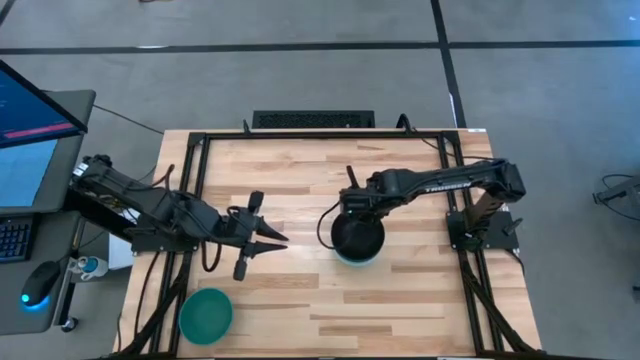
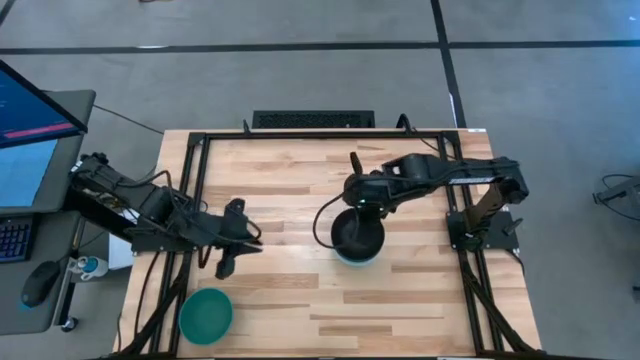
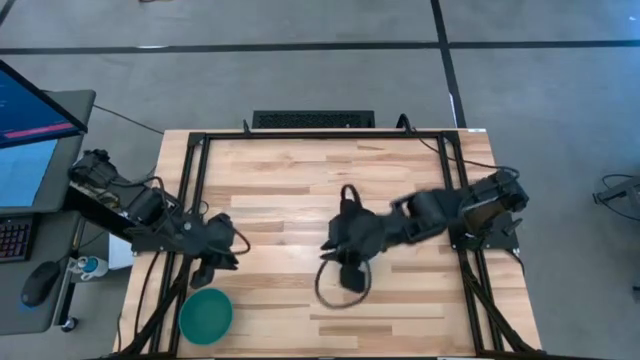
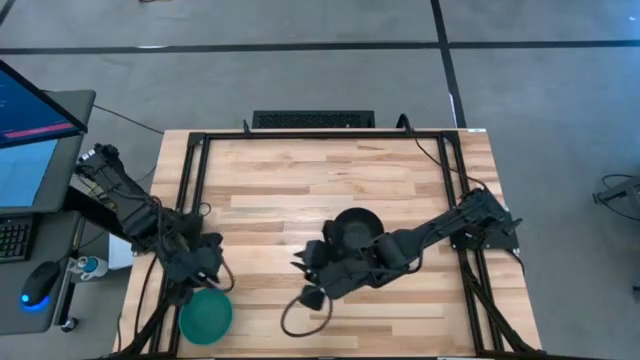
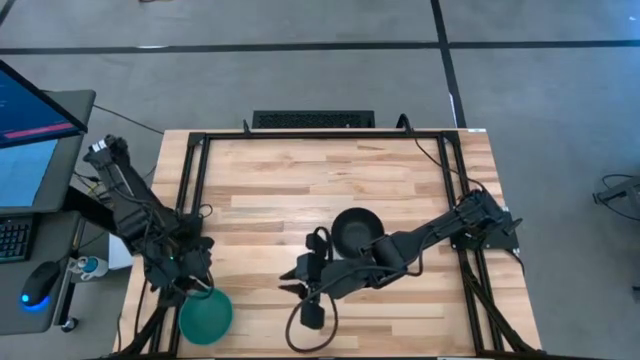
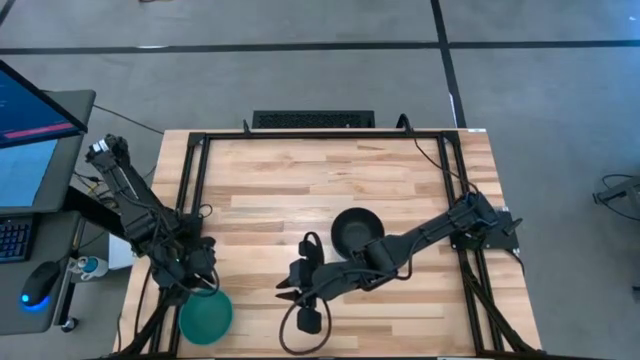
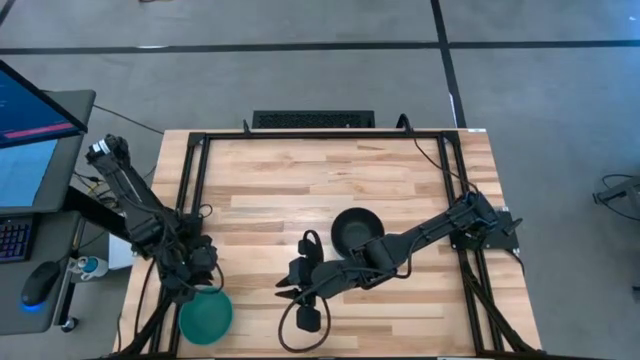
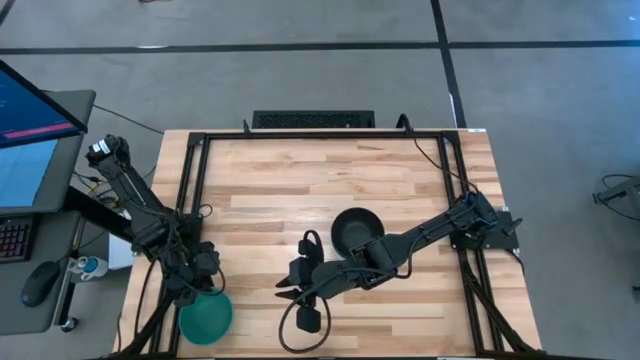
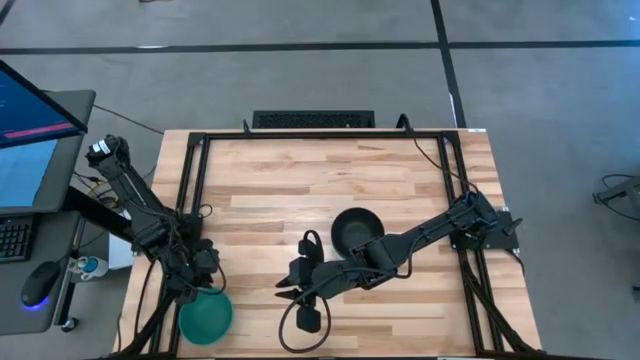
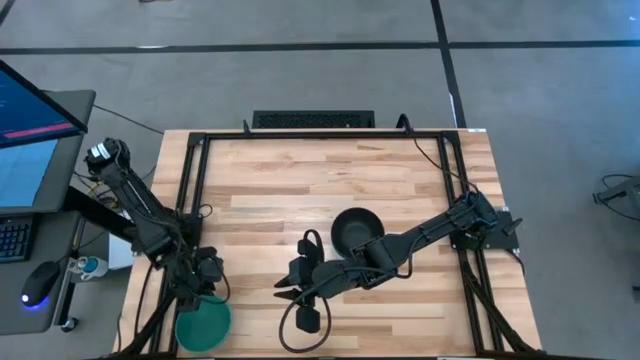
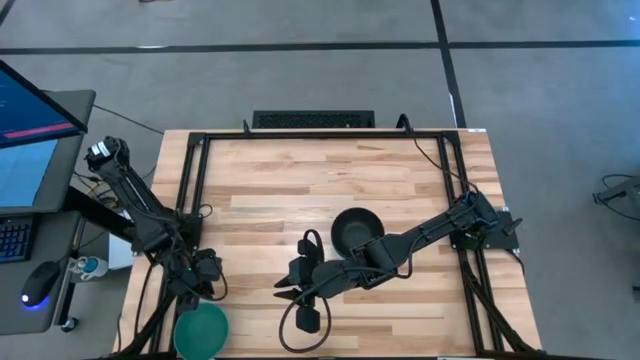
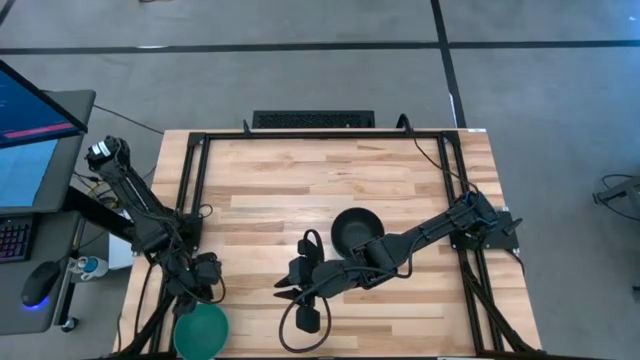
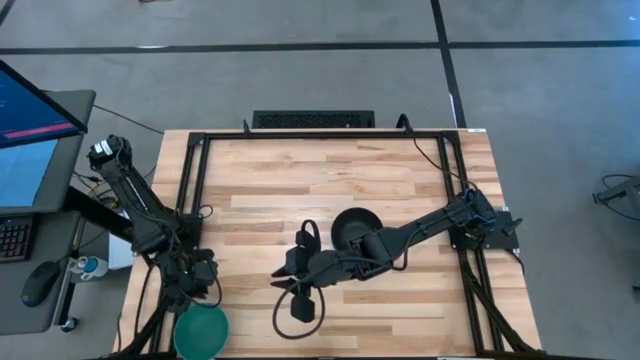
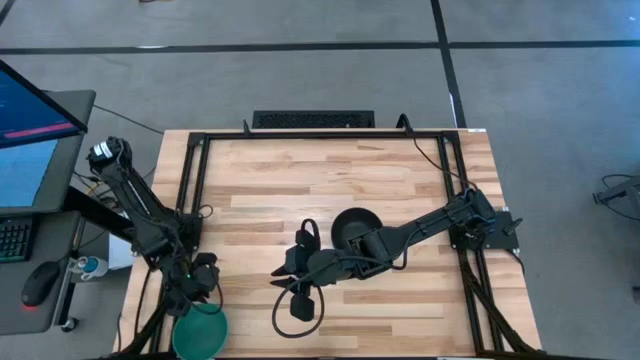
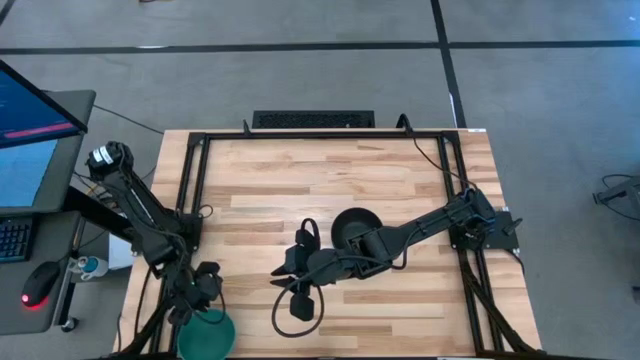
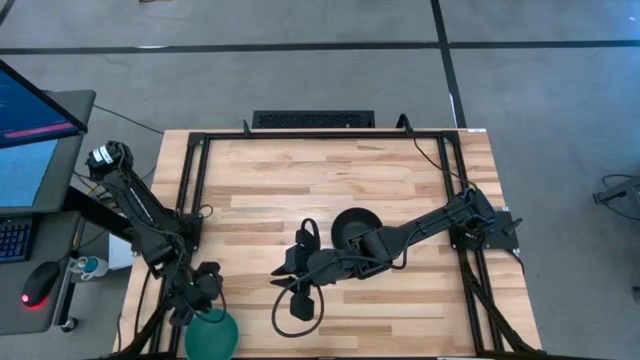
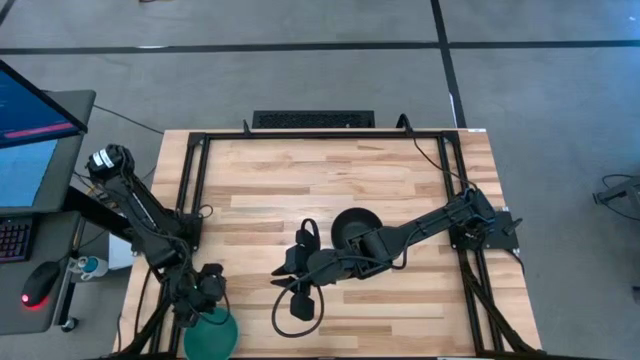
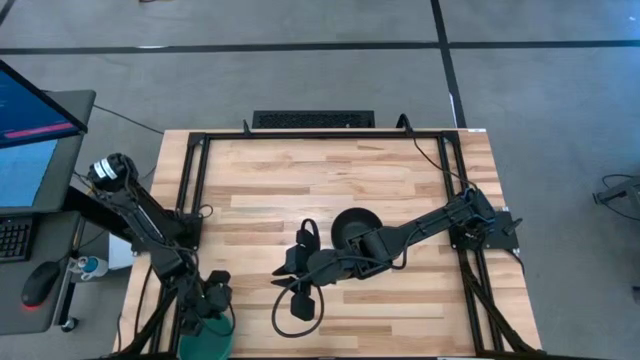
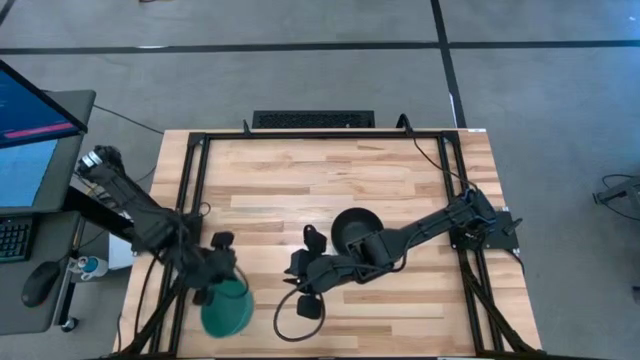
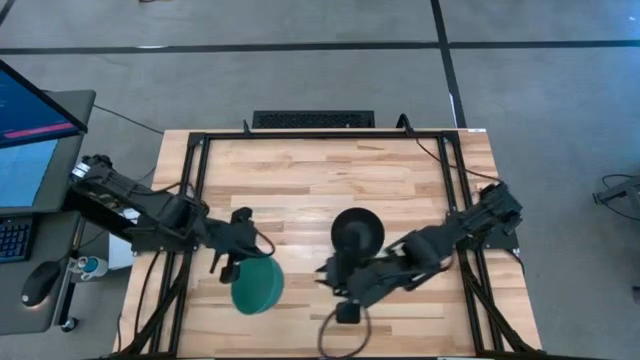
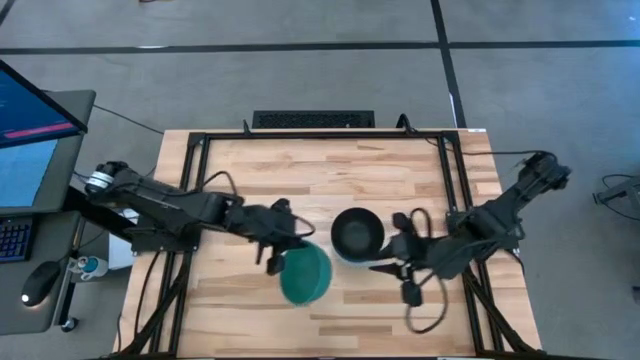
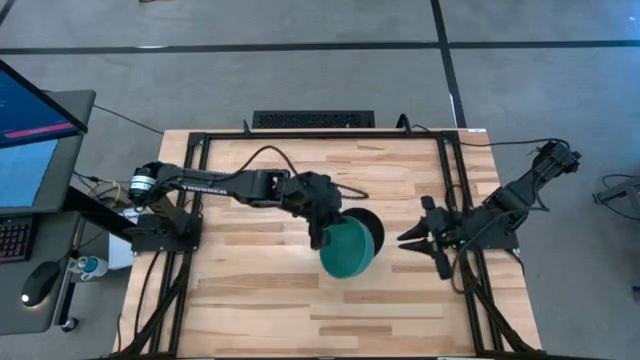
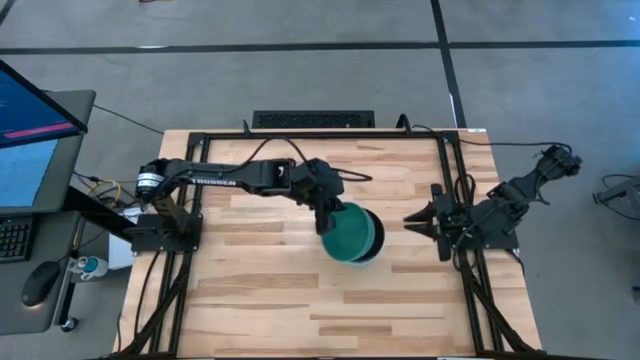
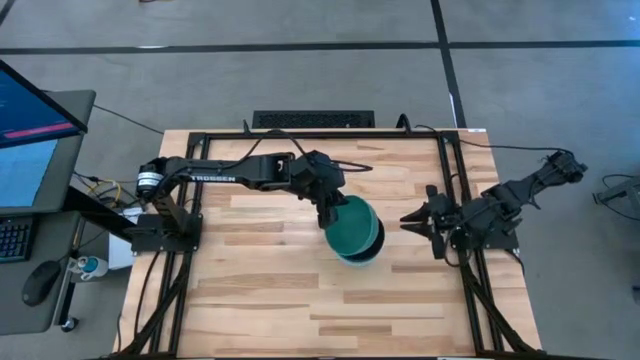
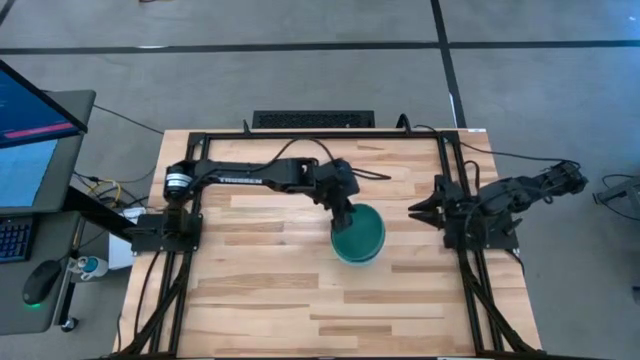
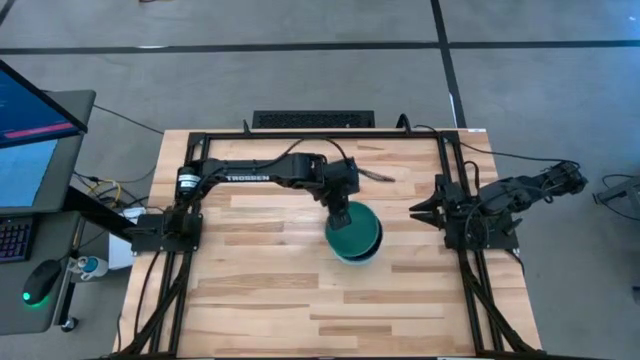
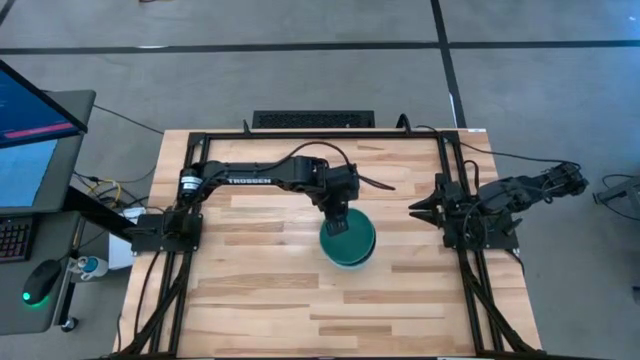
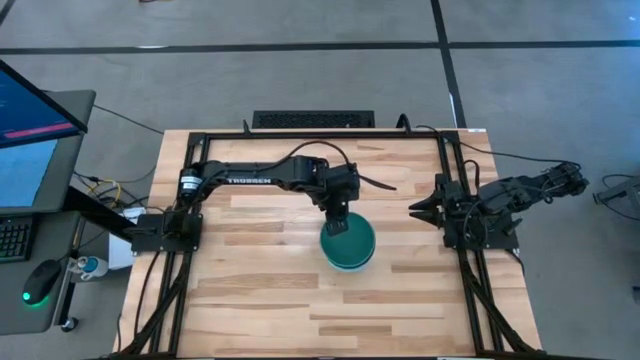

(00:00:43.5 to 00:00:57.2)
Task: Nest bowls inside each other
Stack the green bowl on top of the black bowl

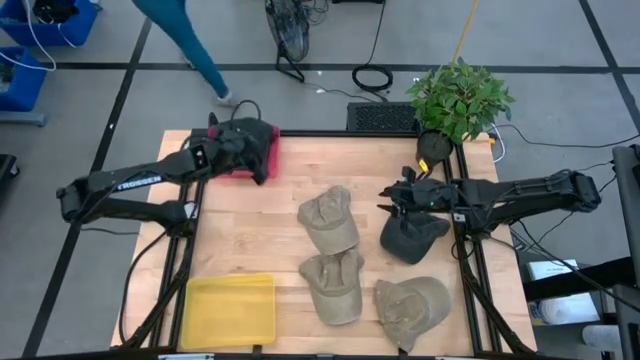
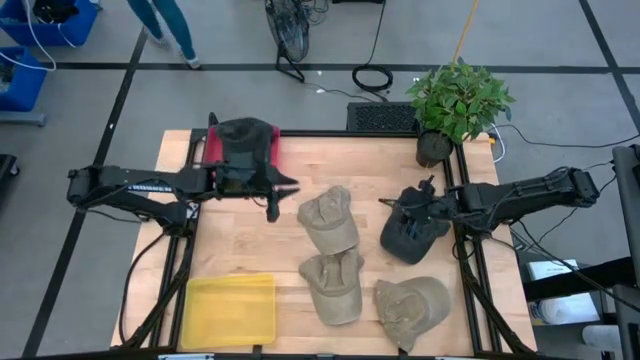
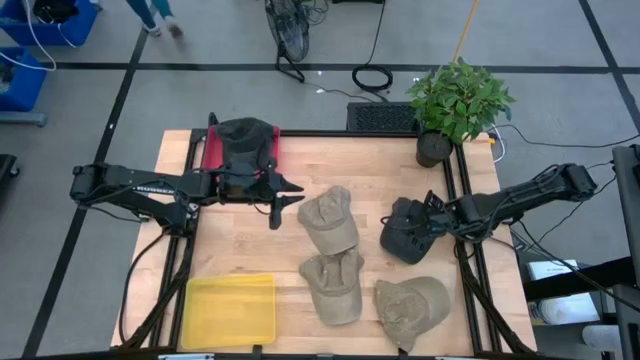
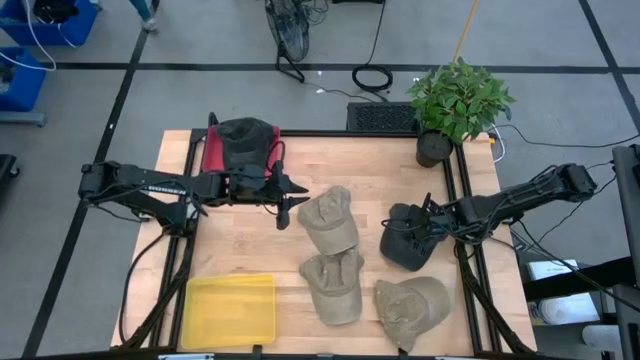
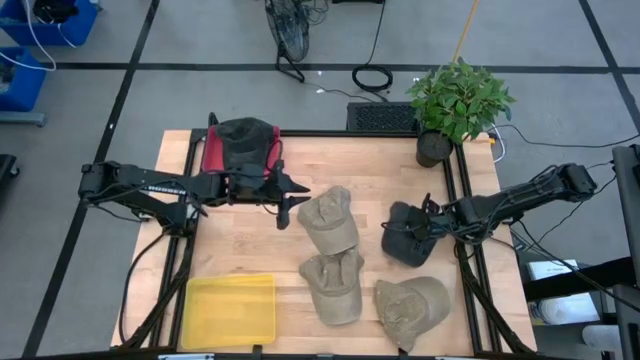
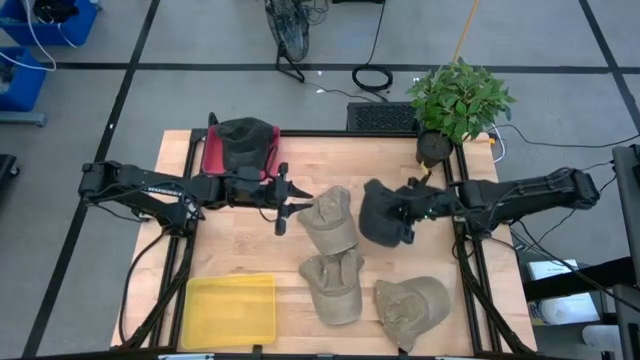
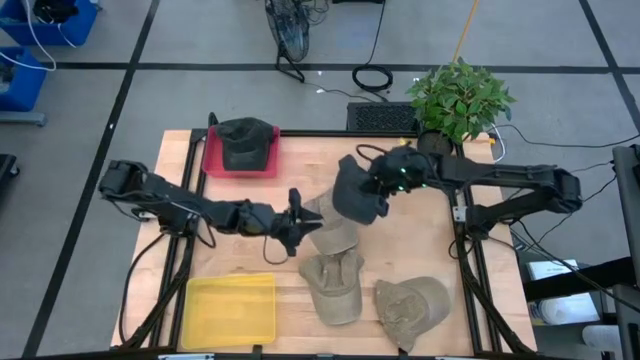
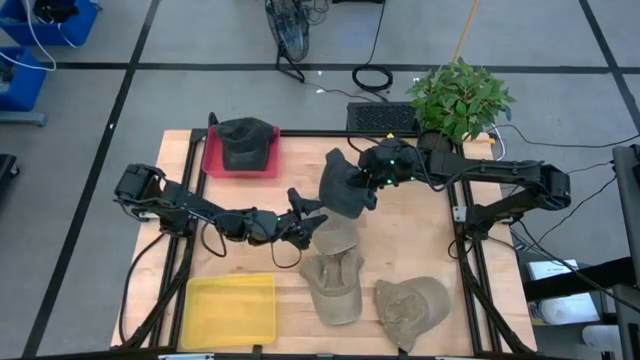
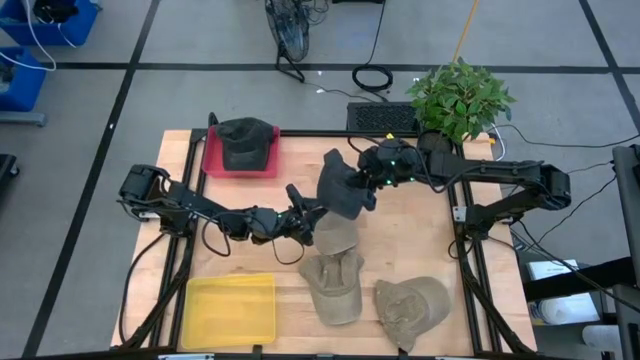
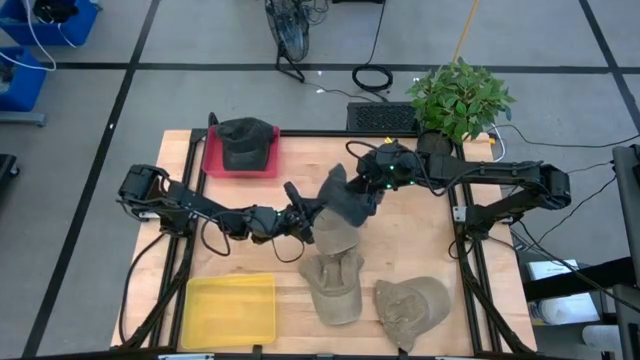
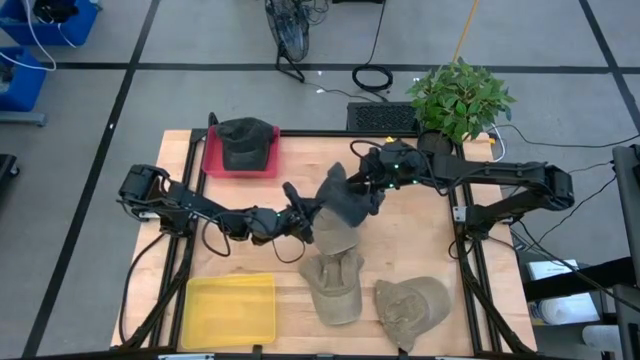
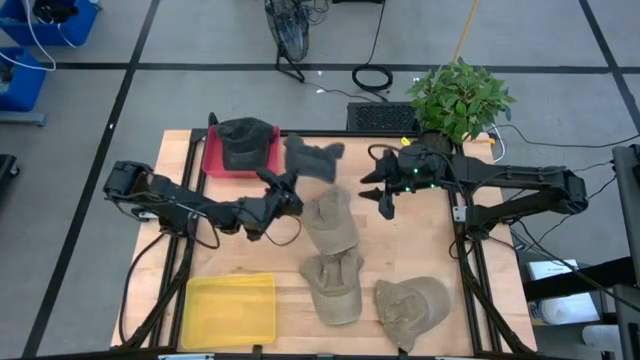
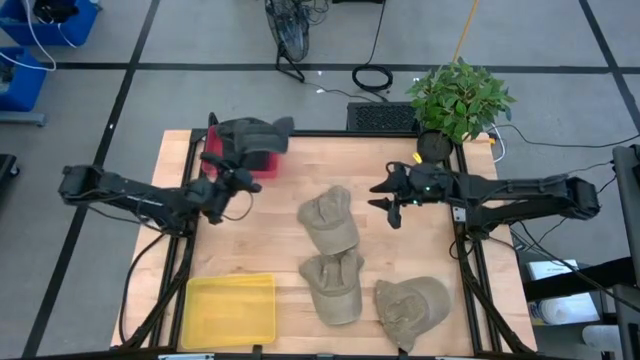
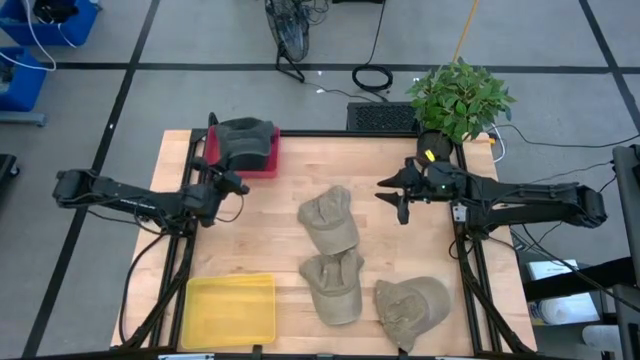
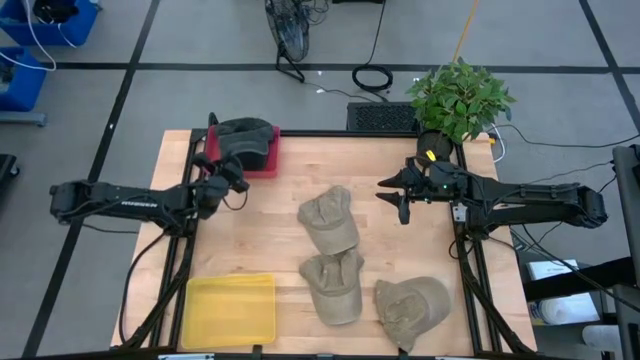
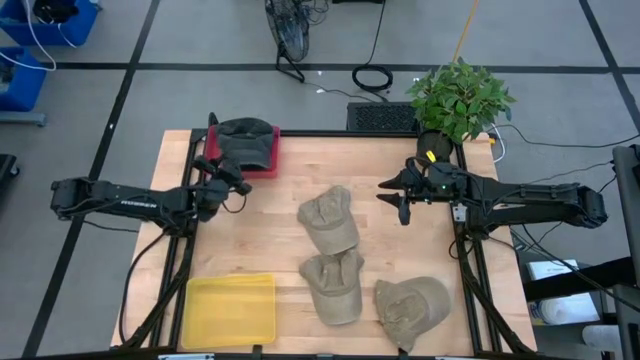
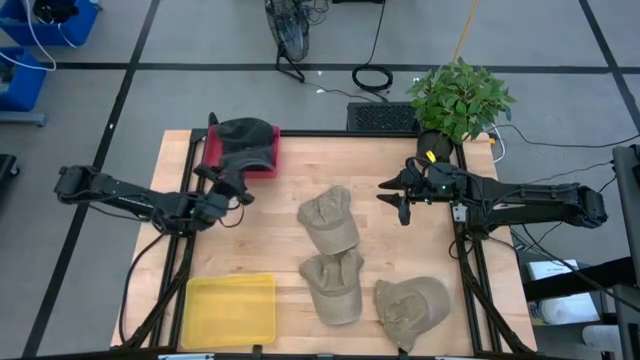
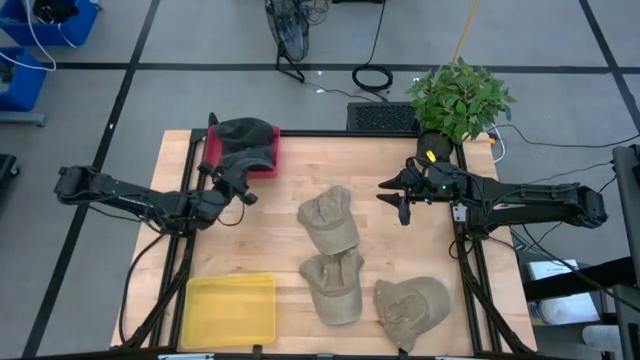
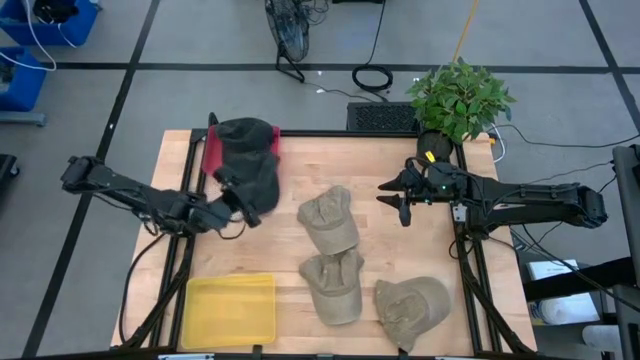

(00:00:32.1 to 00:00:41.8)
Task: Pick & Place hat
Put the black cap into the red bin
